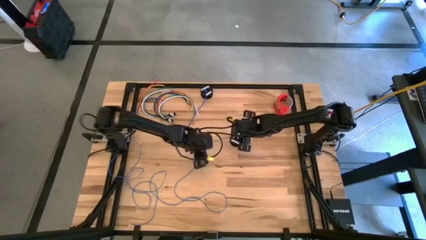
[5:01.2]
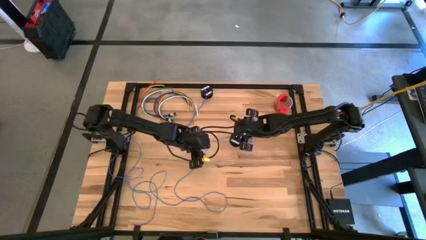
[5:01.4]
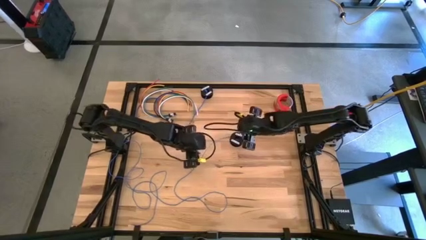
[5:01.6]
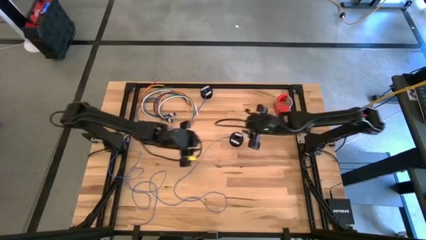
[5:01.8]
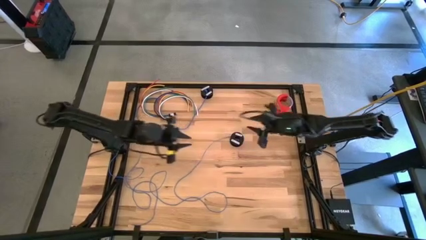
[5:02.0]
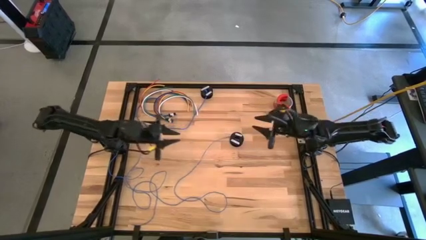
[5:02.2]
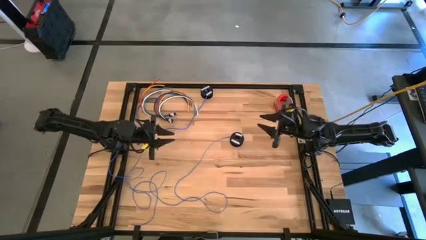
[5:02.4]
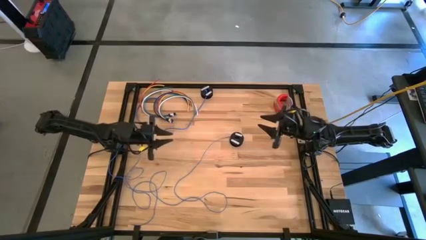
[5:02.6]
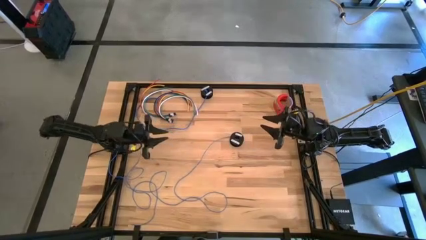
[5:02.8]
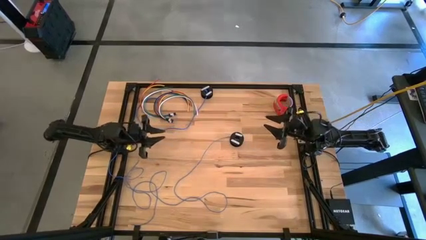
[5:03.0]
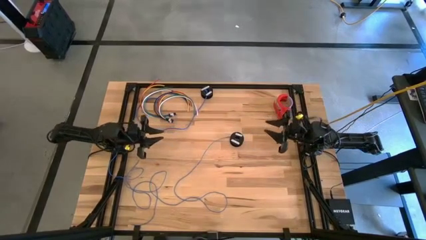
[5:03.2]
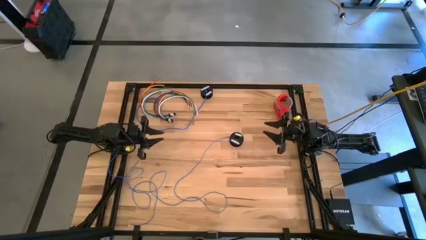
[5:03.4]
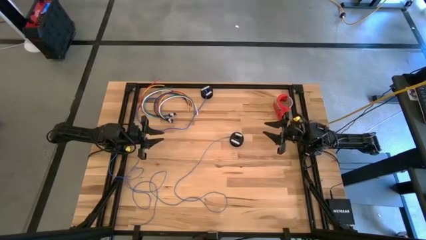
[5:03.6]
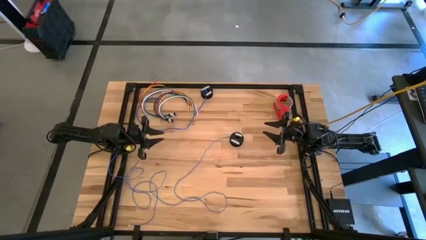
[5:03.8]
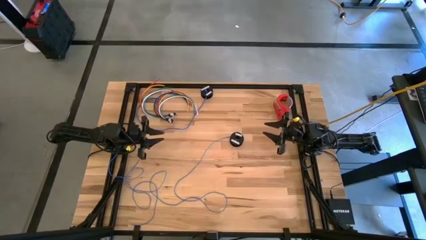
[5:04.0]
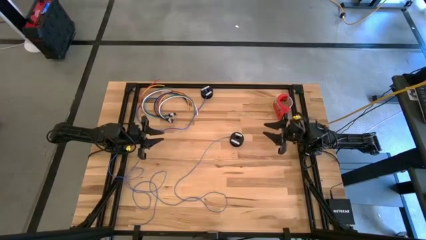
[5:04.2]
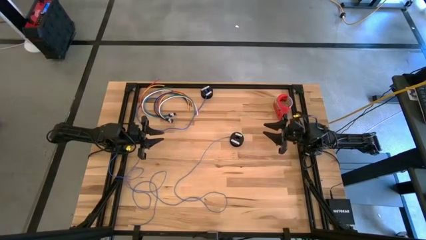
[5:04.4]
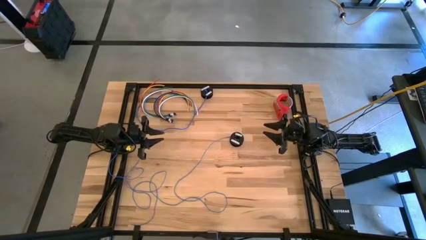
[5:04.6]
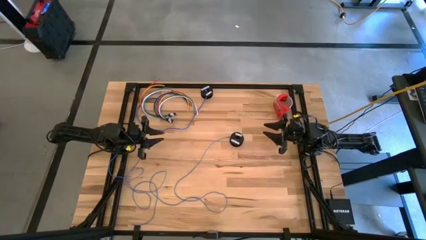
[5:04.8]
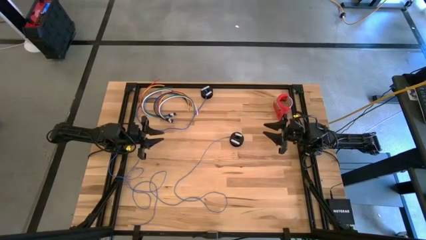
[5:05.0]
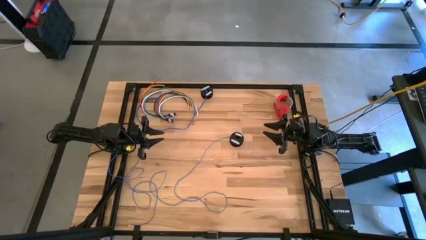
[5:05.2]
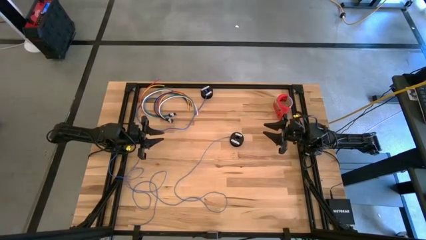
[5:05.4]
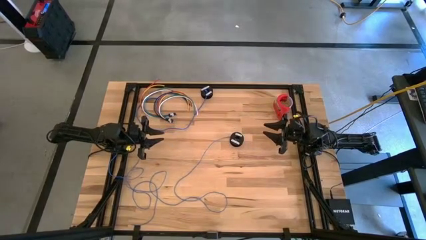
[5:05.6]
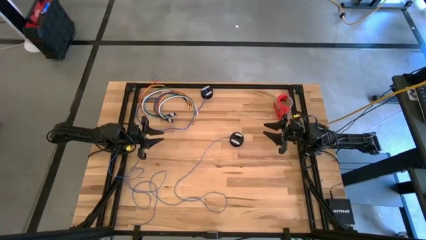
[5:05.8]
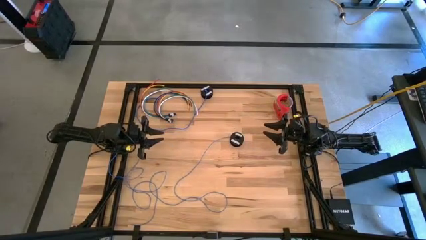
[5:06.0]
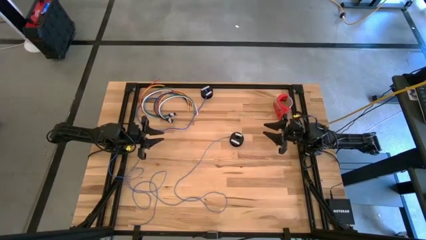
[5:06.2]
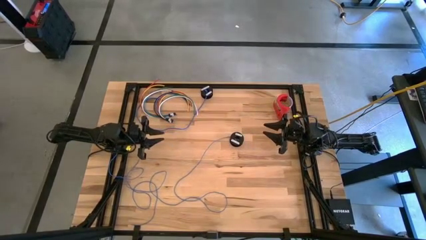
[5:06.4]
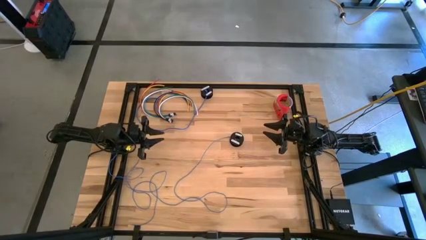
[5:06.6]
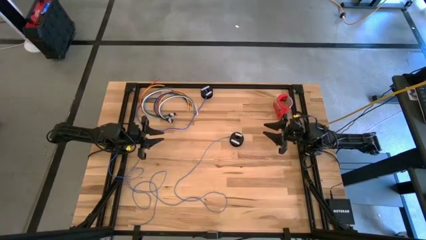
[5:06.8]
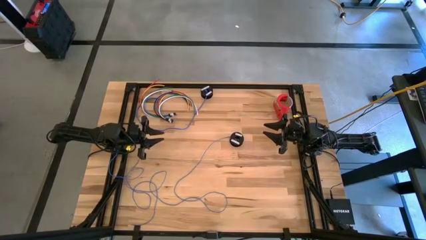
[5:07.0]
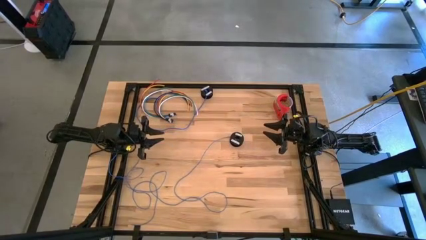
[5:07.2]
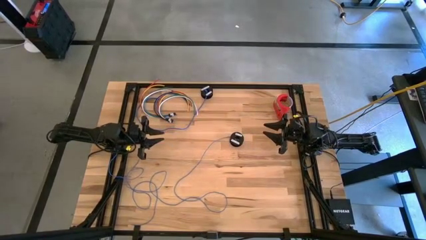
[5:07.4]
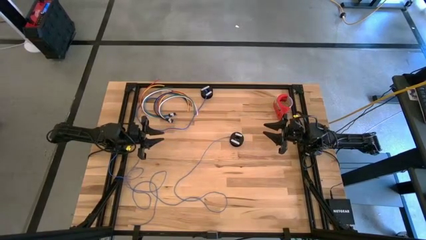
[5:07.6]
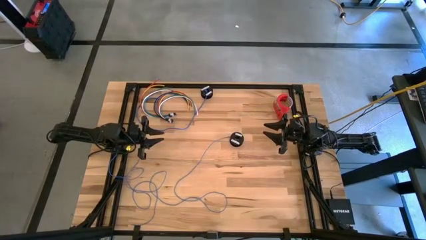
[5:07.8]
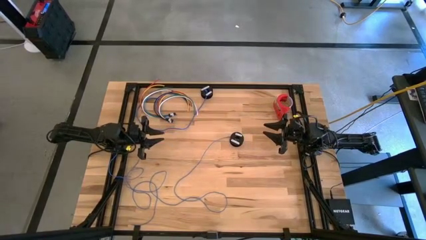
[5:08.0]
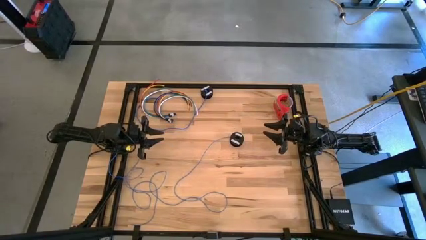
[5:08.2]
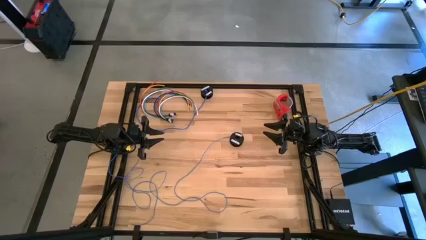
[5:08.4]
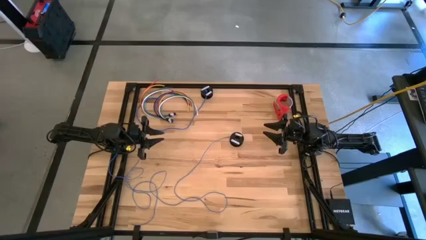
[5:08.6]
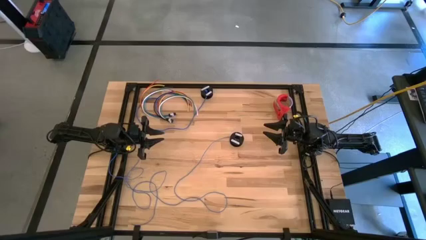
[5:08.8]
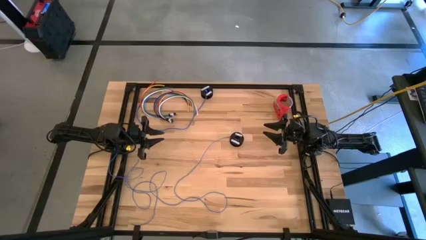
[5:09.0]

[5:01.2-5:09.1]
Task: Coil cords
Return to Home Position

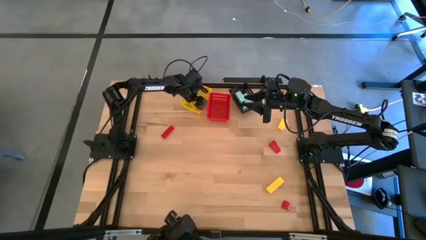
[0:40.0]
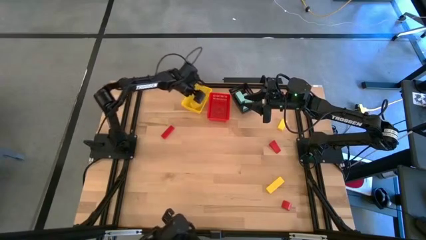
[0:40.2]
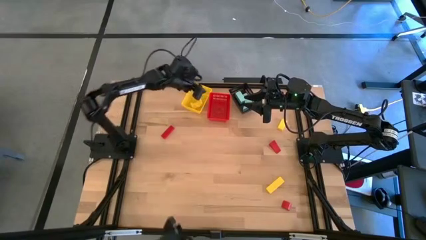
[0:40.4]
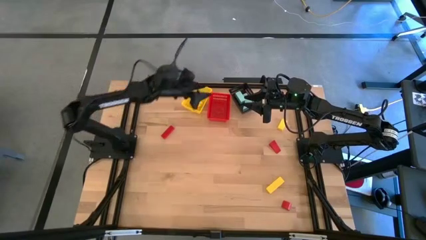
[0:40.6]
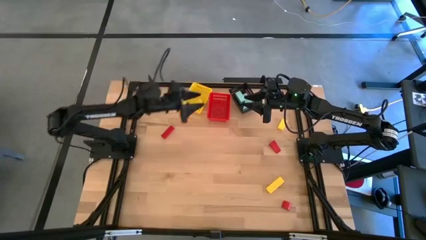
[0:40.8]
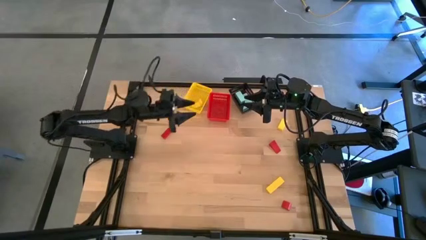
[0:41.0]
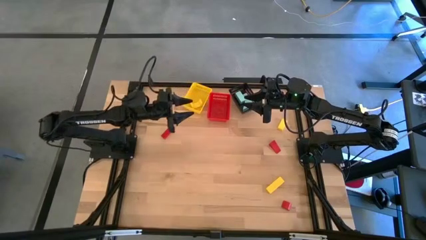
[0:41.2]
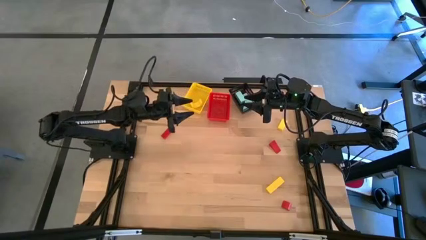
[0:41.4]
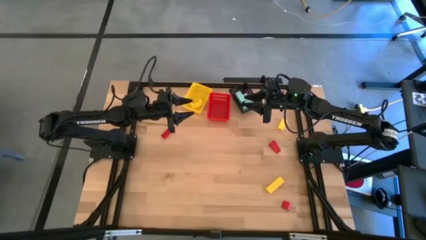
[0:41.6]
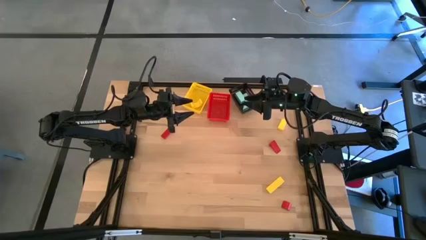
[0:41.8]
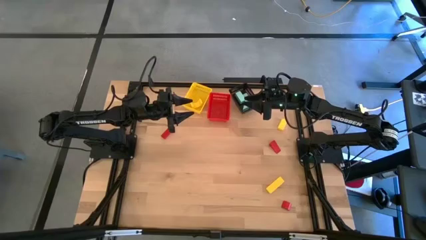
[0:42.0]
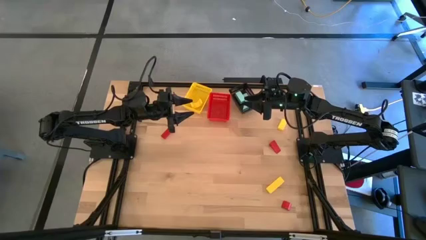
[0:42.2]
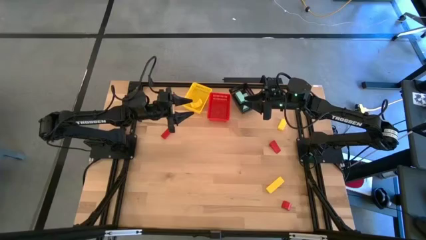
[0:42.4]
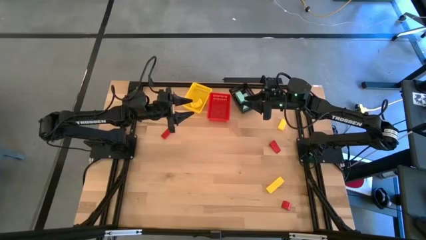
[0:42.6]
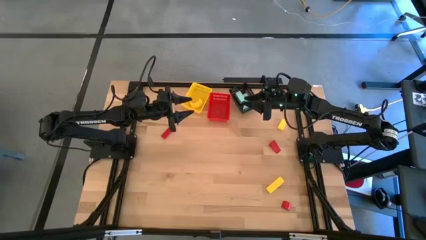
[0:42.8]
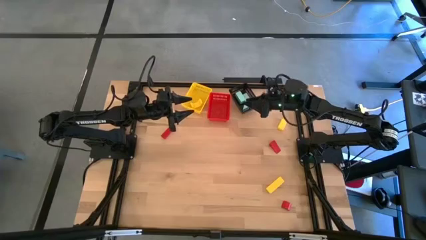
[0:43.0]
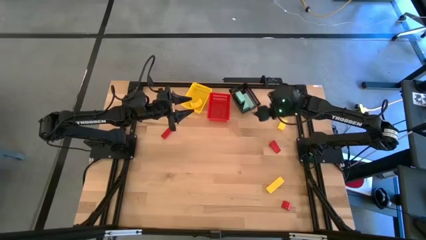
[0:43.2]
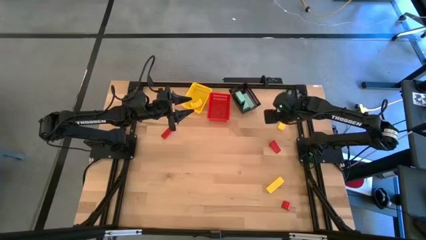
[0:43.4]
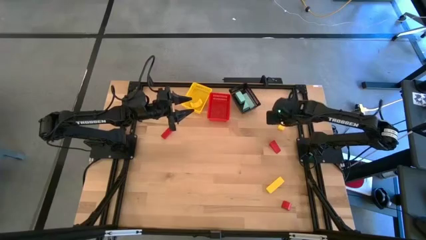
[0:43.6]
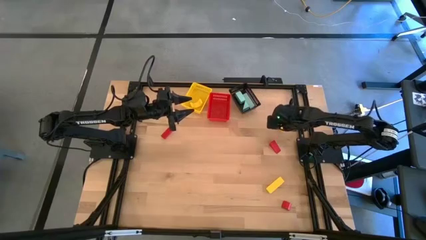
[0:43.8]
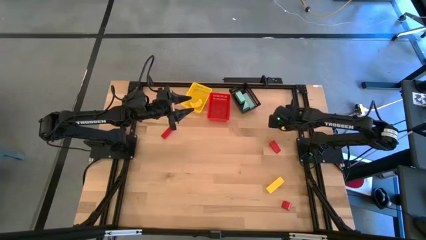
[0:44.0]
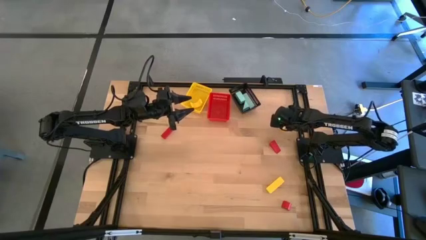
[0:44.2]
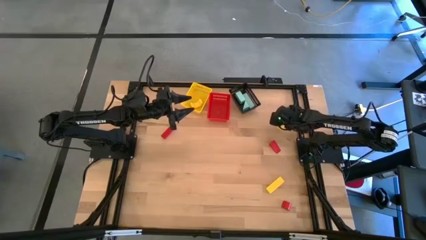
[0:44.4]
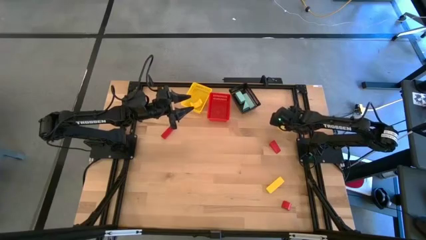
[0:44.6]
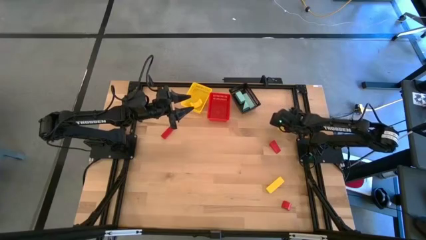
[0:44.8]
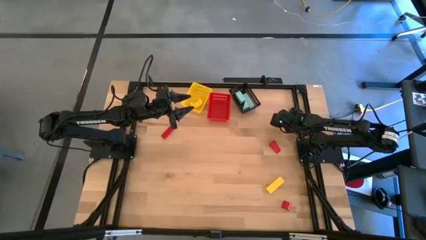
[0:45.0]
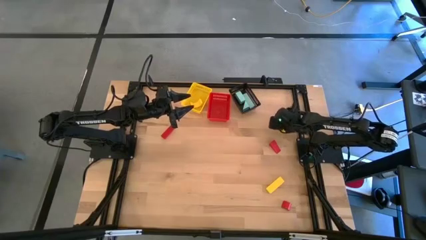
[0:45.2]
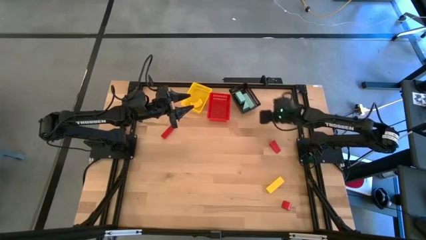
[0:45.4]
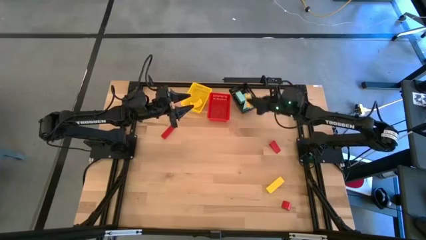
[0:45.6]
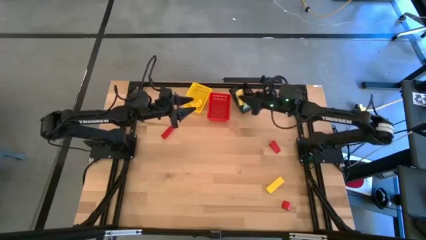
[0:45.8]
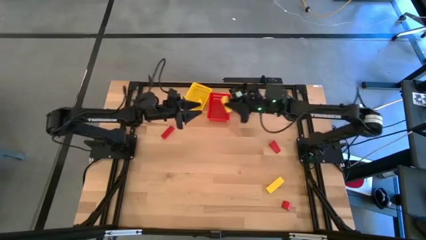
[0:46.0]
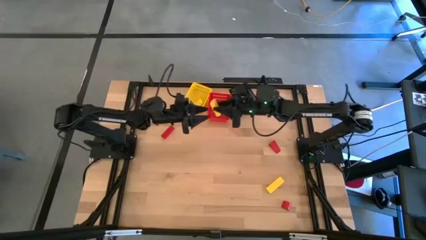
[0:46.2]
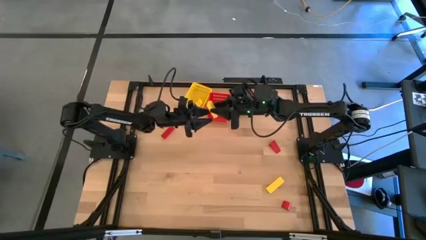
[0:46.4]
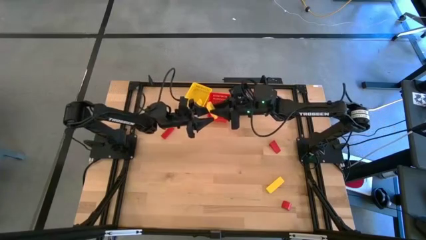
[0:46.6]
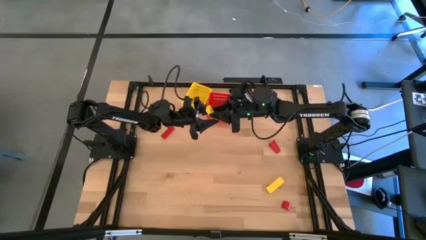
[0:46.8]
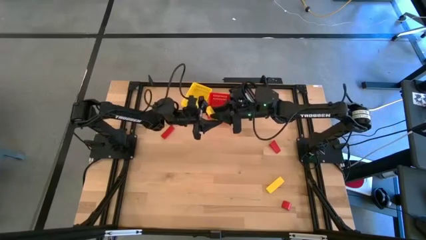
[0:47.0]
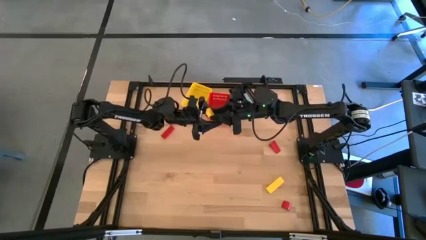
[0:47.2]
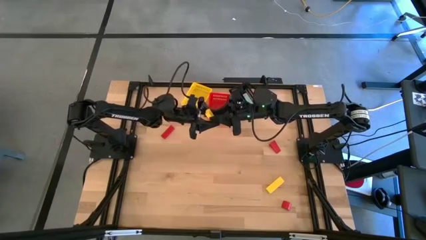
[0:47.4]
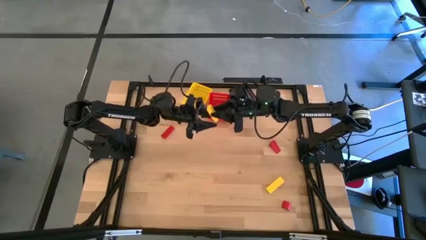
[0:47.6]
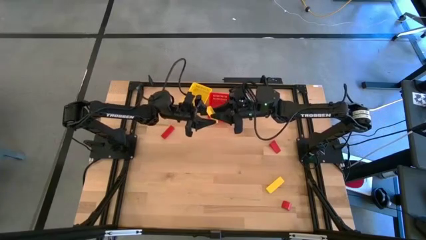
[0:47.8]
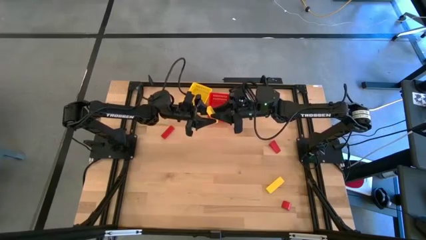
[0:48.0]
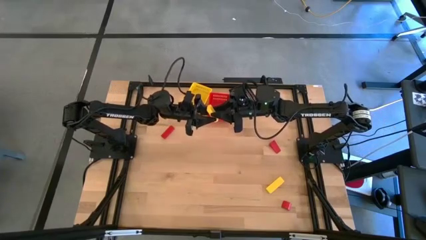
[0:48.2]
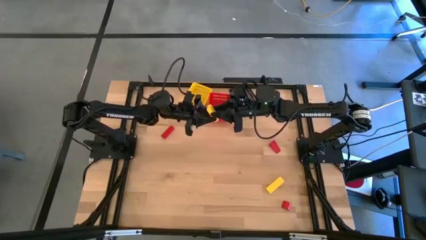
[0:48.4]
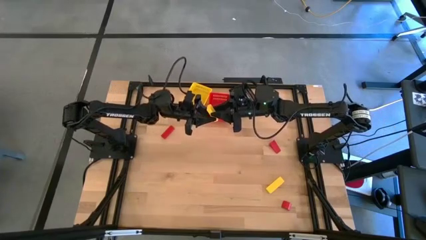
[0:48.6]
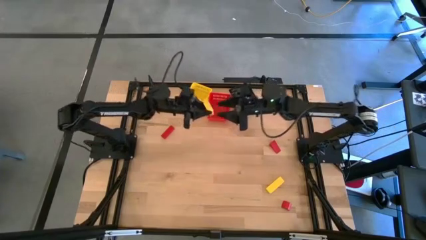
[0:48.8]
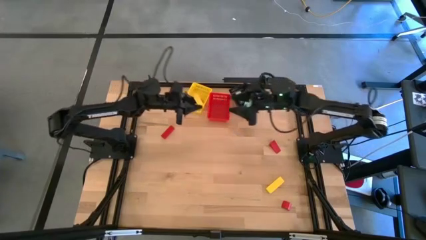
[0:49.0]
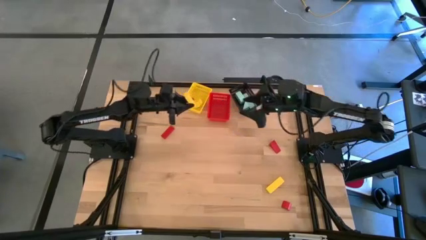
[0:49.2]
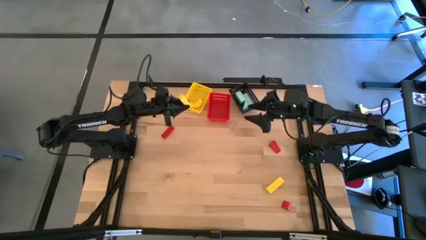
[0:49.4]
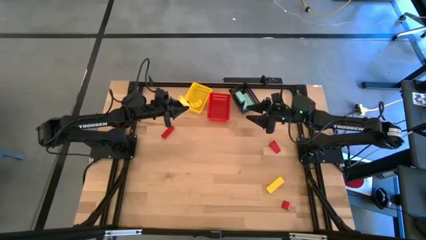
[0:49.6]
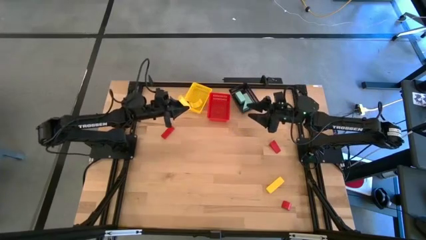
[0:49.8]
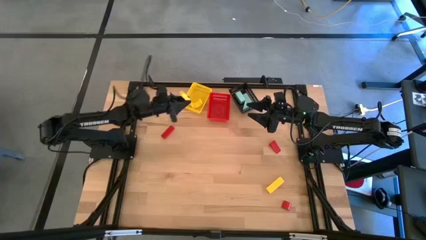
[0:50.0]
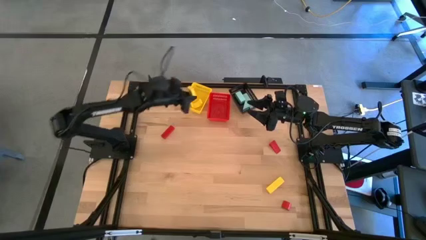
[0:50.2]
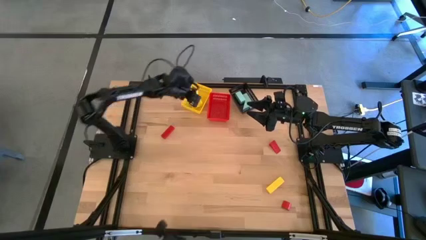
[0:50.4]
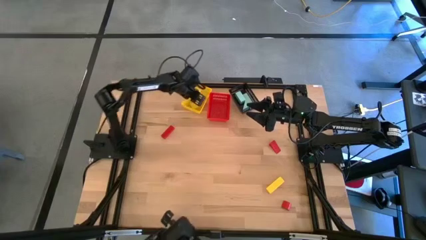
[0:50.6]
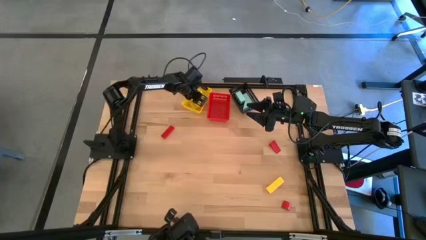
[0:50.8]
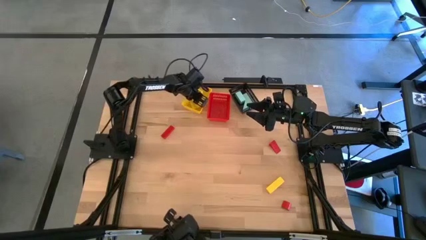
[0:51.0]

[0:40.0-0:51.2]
Task: Sort & place blocks by color
Put the top yellow block into the yellow bin
